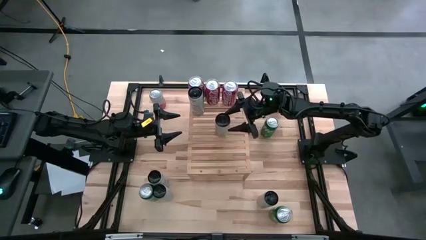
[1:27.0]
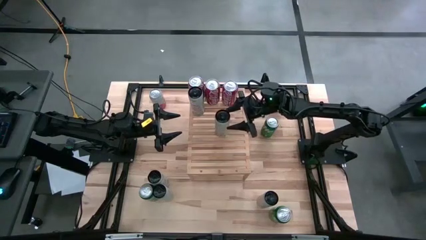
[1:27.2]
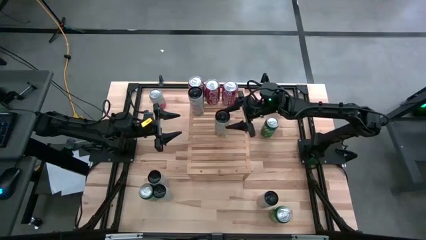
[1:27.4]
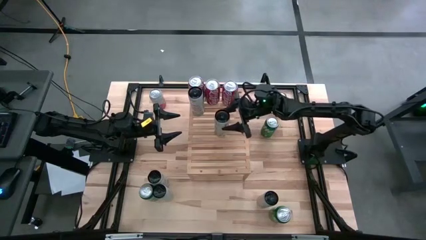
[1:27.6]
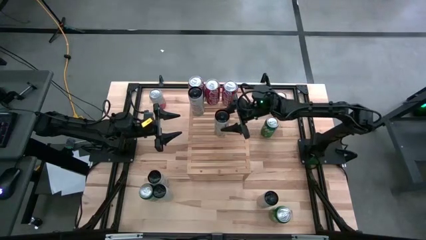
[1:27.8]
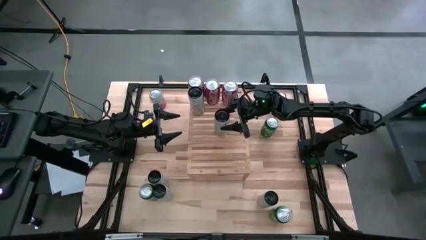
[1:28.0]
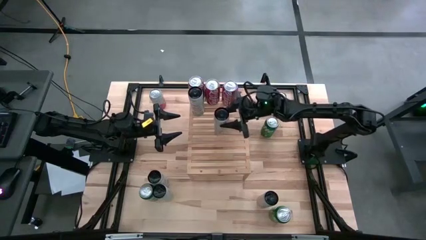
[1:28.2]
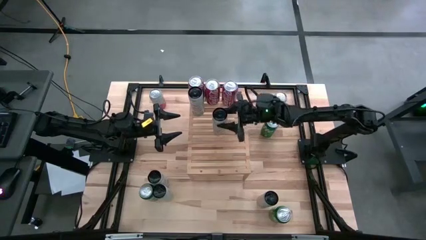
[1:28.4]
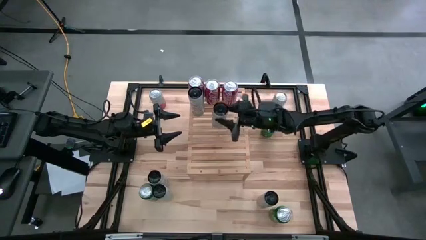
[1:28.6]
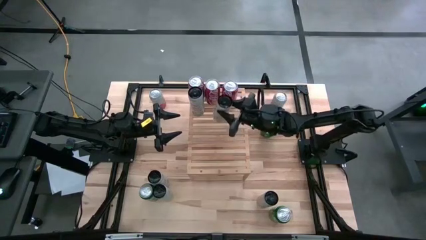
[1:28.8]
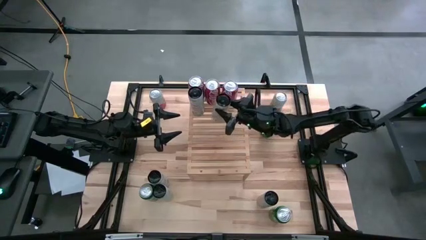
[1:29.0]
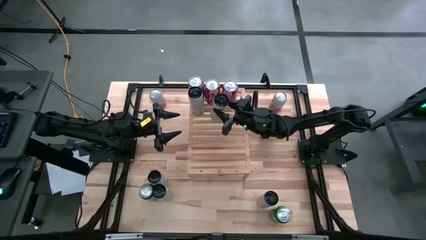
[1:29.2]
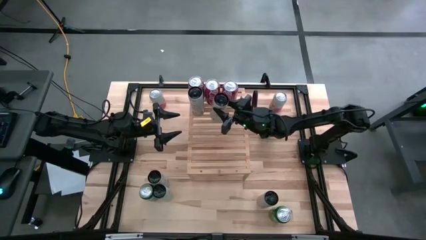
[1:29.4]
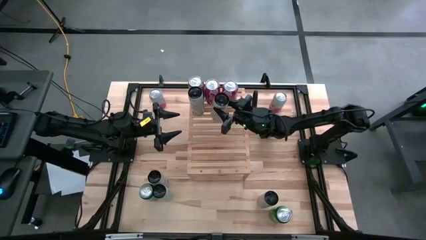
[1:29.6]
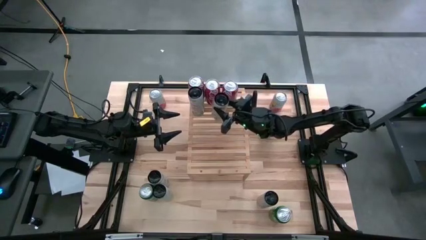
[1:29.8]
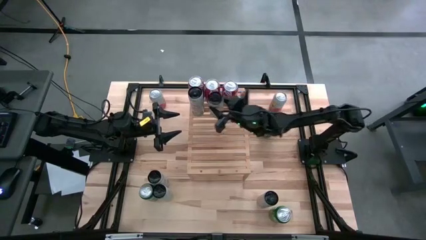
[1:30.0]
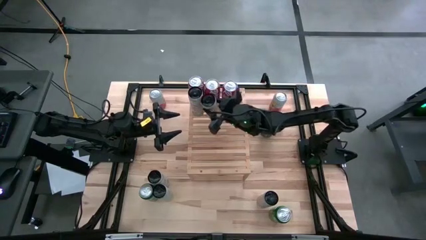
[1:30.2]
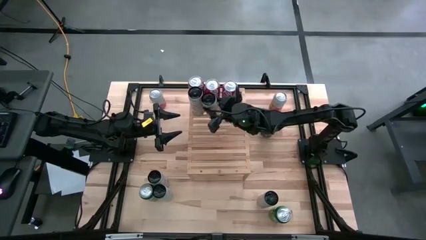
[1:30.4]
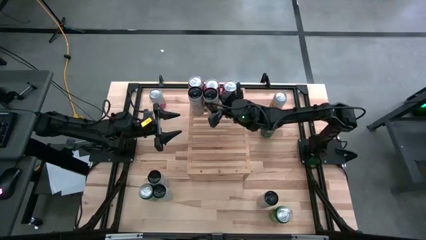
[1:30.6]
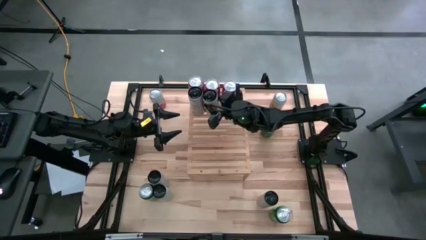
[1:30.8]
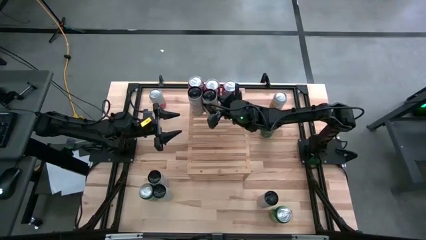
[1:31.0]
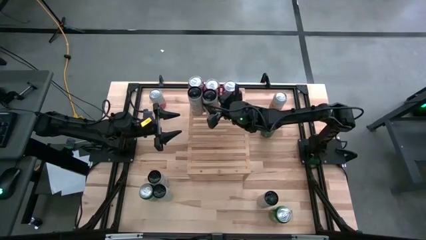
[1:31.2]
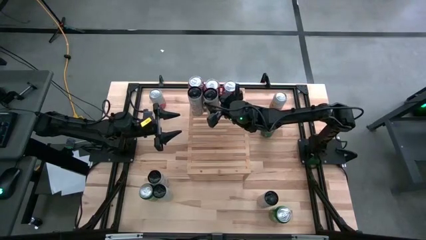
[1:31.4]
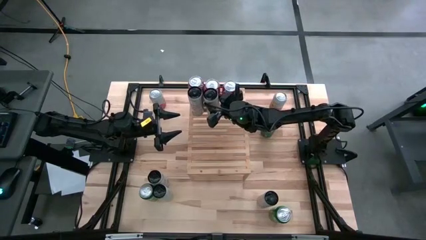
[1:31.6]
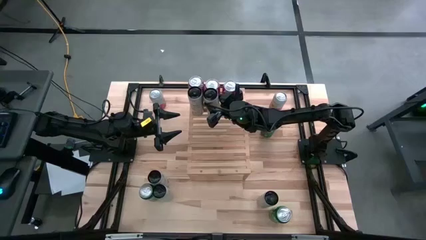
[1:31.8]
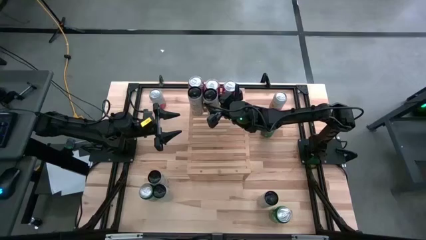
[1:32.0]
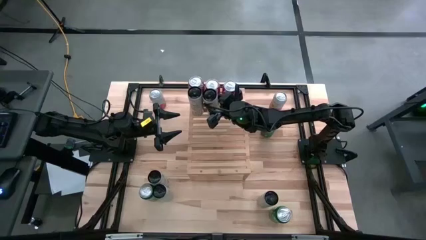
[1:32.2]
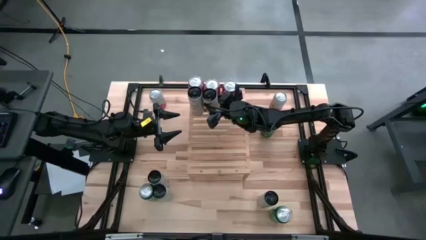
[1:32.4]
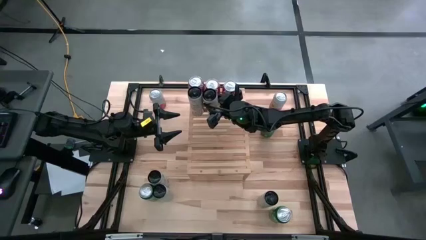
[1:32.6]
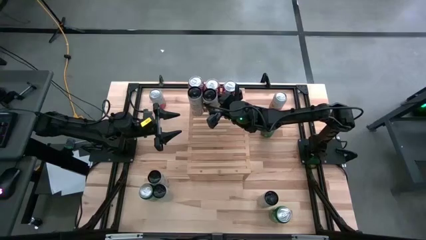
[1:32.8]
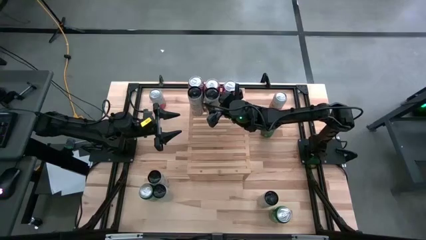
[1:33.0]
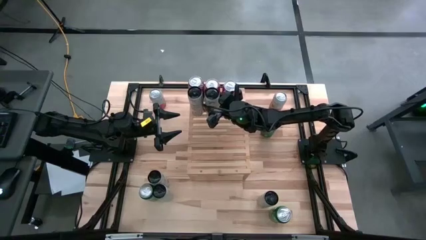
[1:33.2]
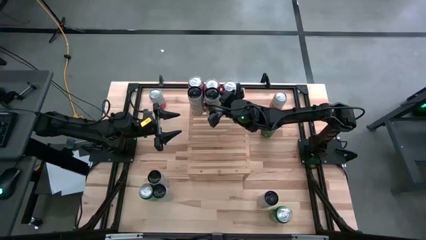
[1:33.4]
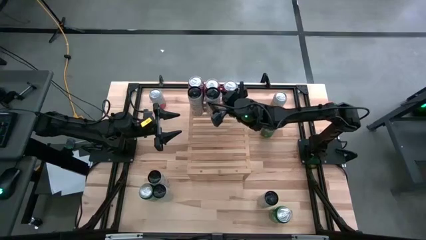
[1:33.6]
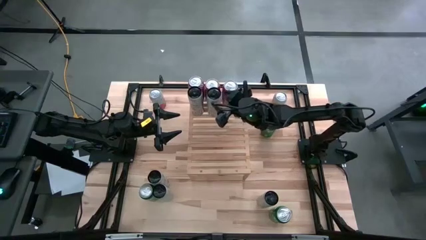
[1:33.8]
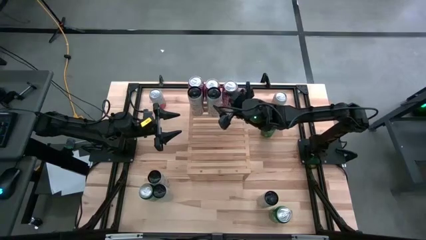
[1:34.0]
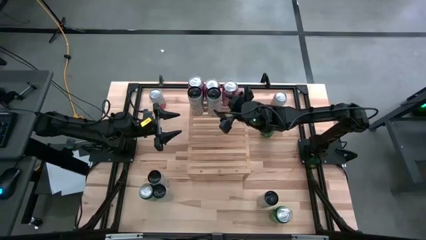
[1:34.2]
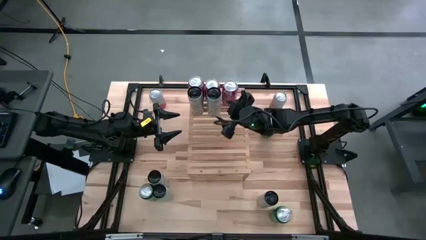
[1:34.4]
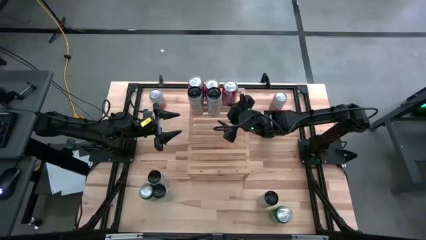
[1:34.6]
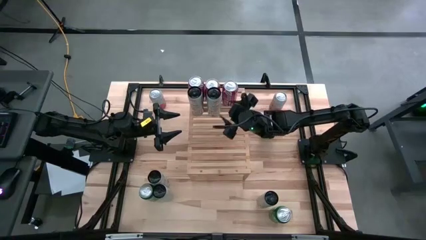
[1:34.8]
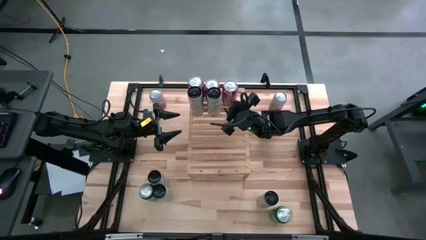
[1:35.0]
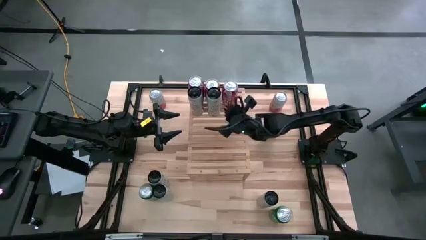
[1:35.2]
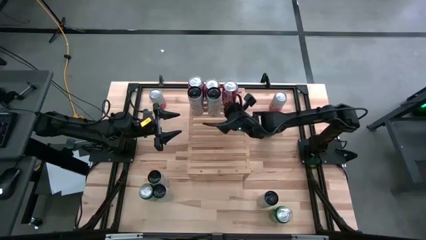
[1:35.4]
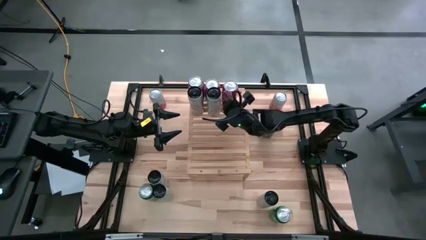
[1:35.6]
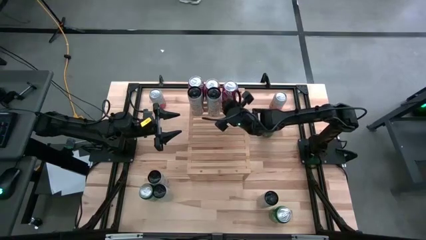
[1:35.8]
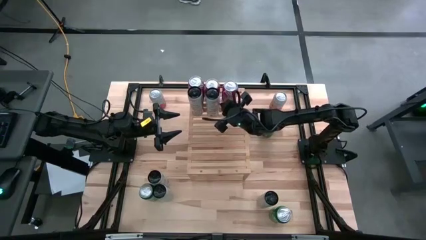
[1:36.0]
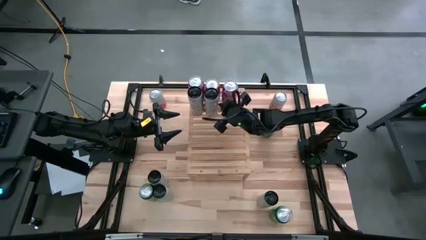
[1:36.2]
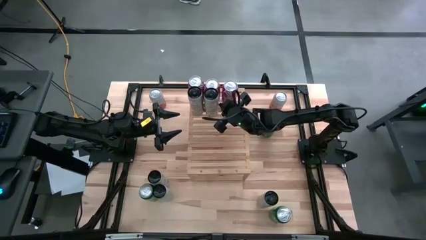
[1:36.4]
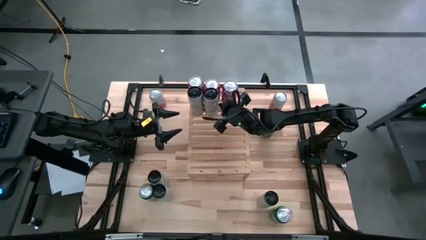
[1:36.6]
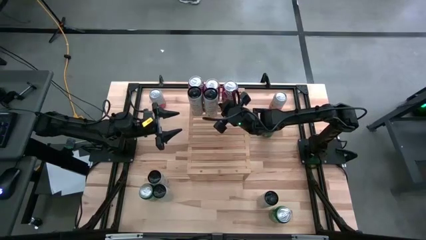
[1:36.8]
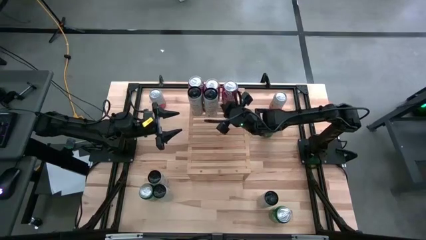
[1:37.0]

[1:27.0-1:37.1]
Task: Place canned beverage on shelf
Align the top right tropical celsius soda can with the other tropical celsius soda can on the shelf

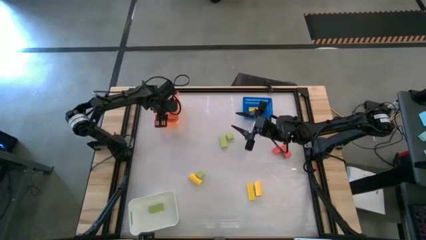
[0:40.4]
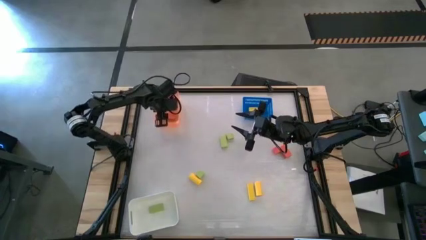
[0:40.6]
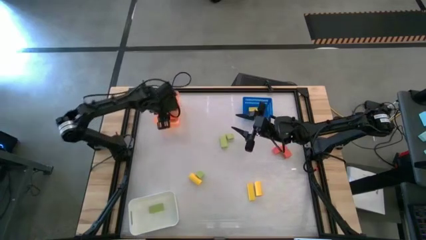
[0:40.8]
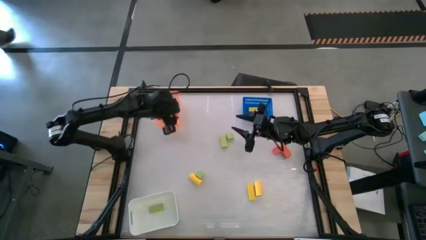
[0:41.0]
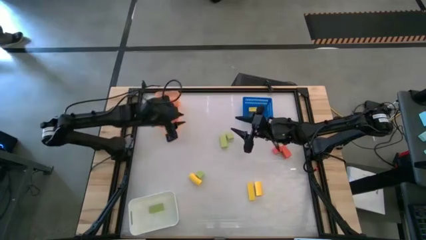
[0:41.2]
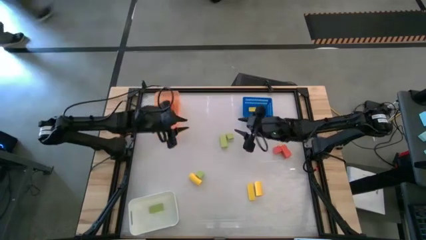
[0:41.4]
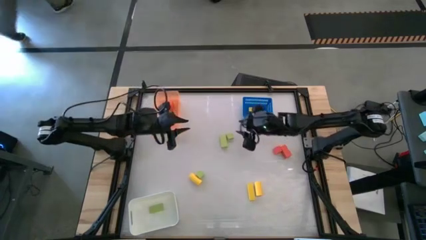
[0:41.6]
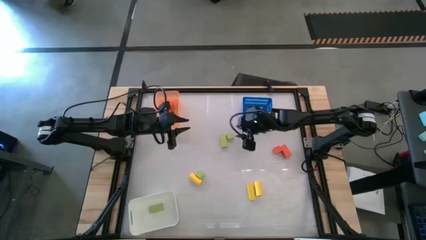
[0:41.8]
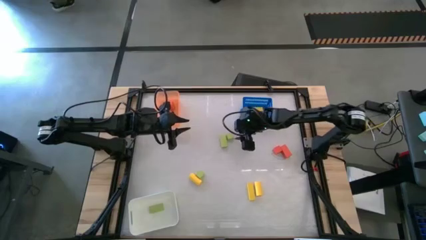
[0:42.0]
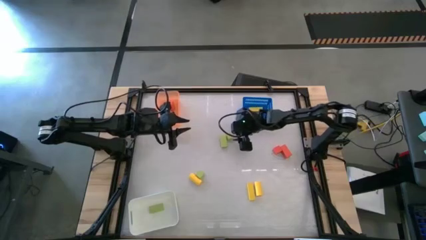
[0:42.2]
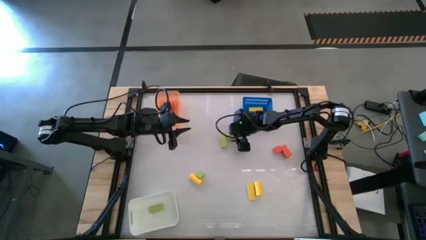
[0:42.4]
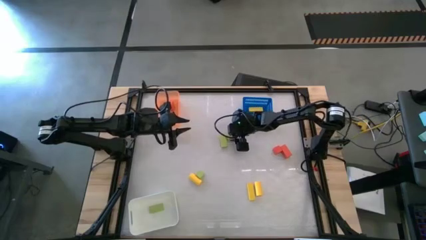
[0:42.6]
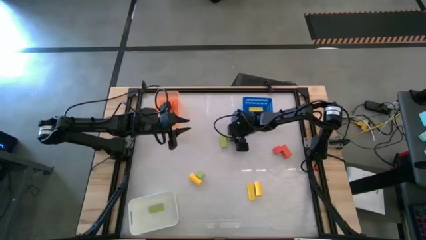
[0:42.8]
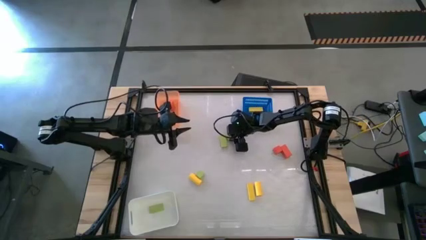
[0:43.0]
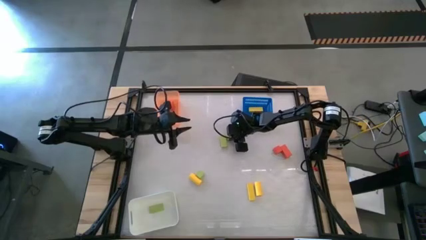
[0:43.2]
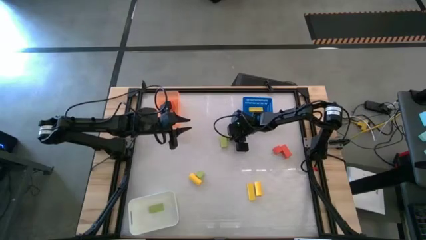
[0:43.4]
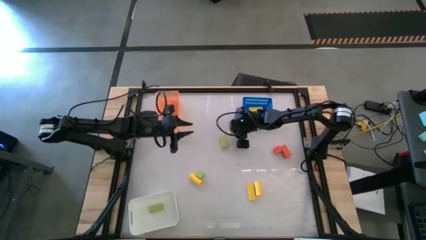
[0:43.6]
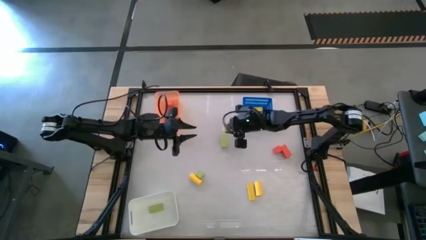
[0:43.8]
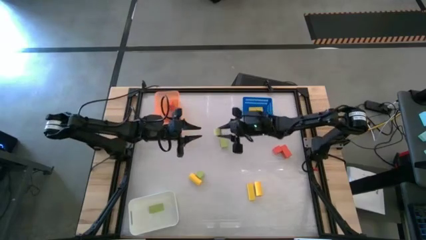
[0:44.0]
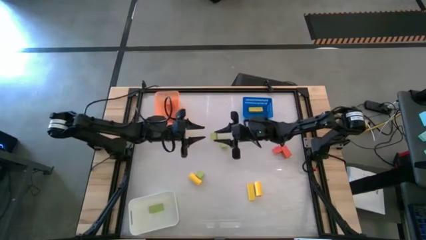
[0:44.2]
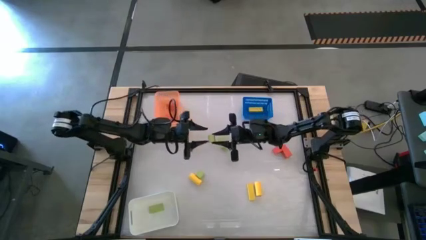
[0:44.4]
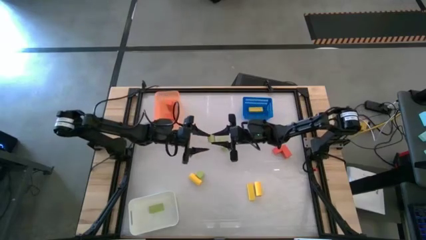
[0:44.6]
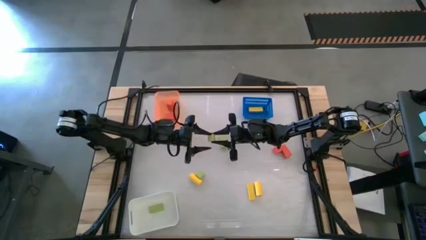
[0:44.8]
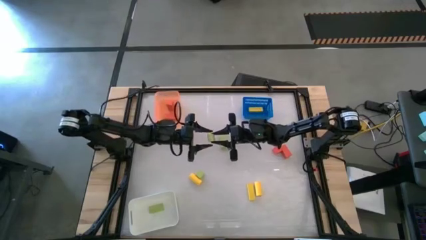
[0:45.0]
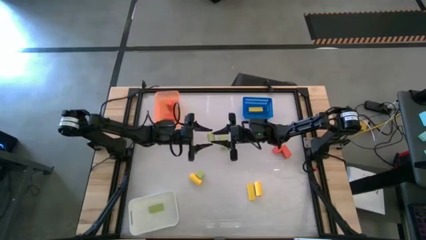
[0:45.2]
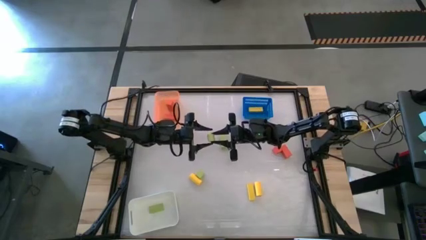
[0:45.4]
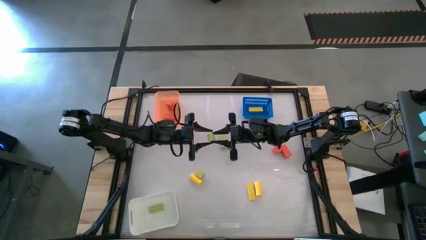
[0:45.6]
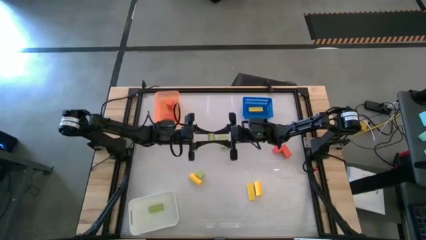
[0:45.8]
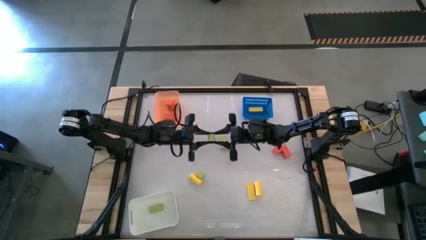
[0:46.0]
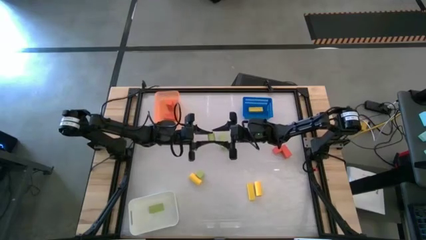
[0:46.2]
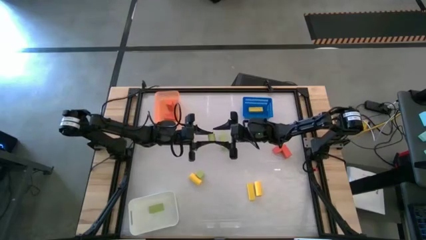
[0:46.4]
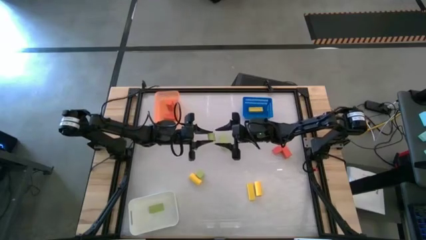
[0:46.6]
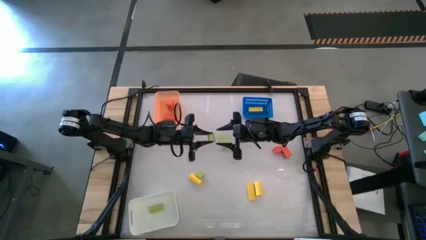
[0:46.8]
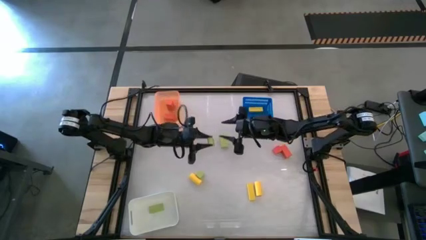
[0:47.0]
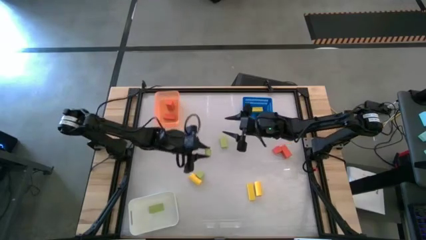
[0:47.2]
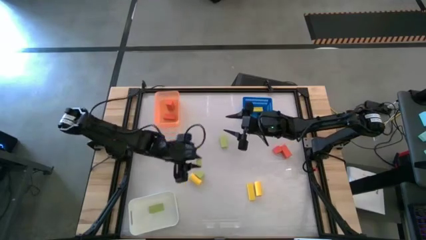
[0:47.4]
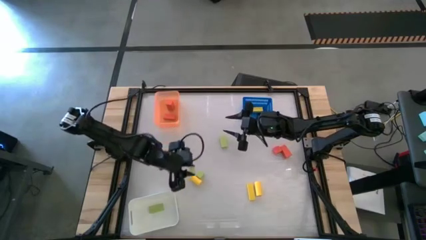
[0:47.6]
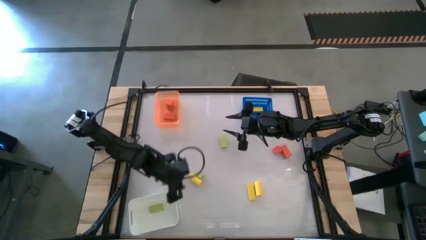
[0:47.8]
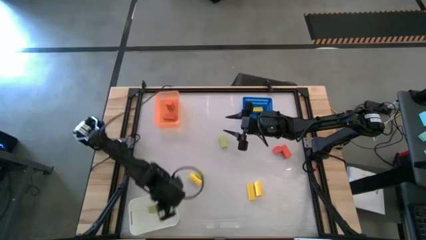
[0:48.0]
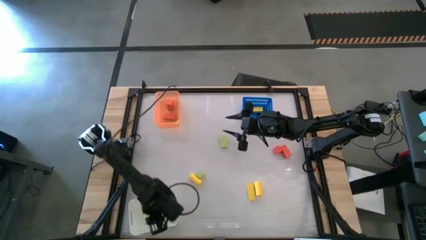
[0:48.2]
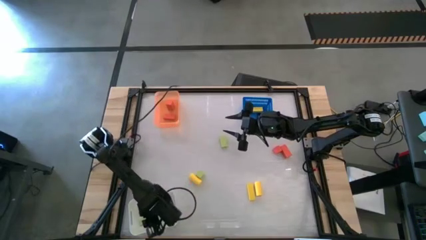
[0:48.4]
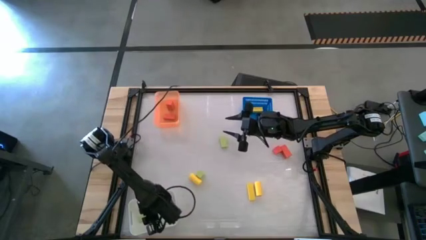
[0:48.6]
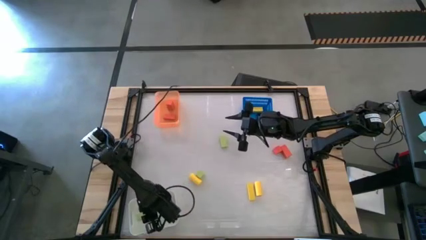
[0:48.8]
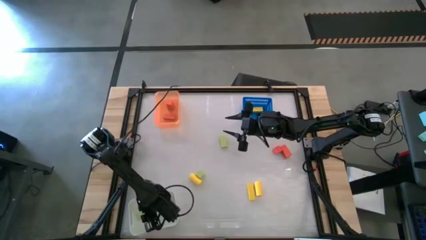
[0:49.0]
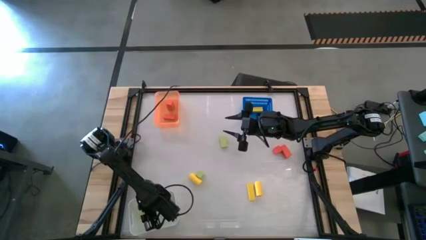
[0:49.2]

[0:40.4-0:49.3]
Task: Sort & place blocks by color
Put the green wooden block into the white bin
